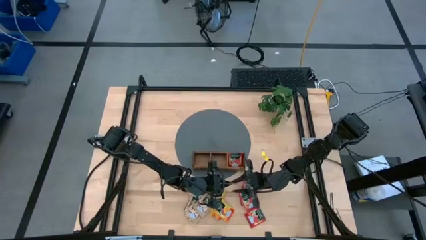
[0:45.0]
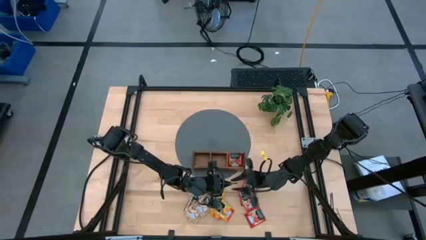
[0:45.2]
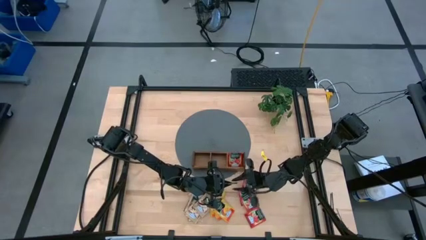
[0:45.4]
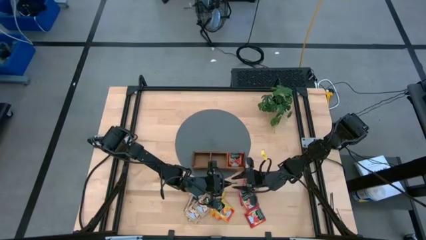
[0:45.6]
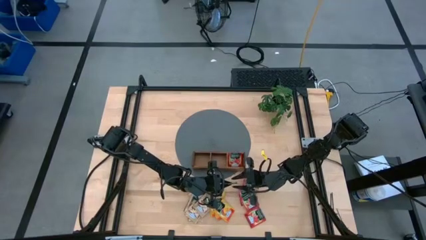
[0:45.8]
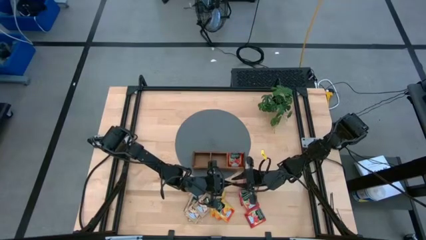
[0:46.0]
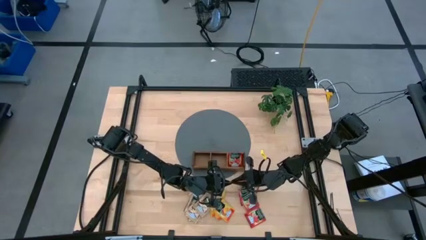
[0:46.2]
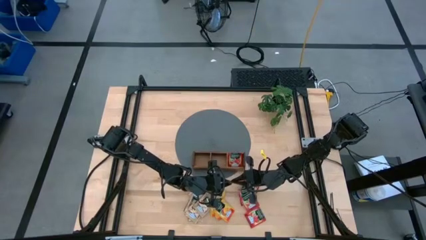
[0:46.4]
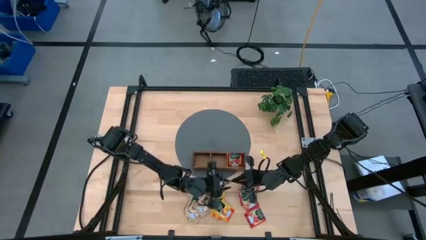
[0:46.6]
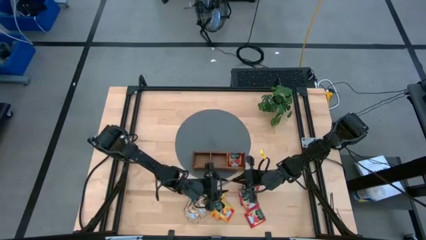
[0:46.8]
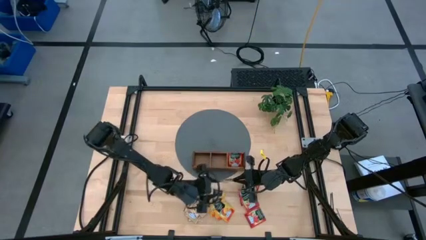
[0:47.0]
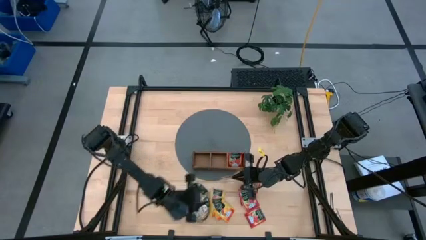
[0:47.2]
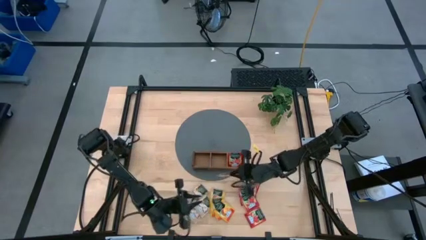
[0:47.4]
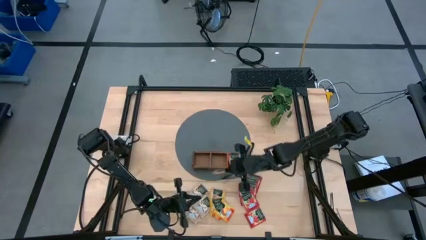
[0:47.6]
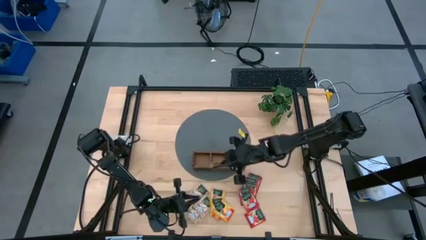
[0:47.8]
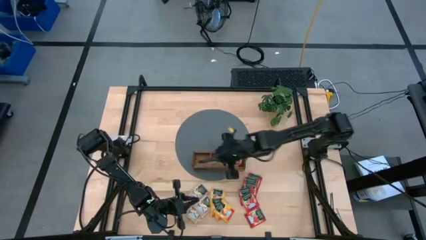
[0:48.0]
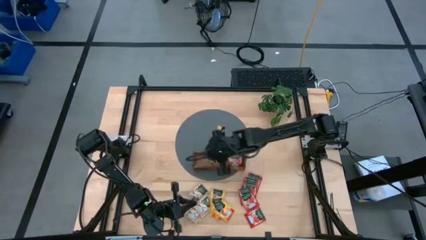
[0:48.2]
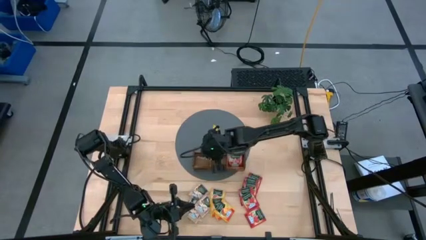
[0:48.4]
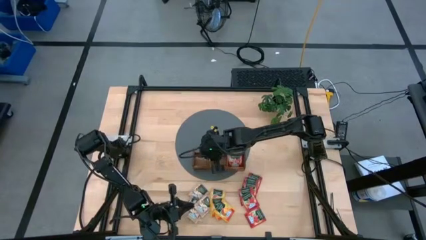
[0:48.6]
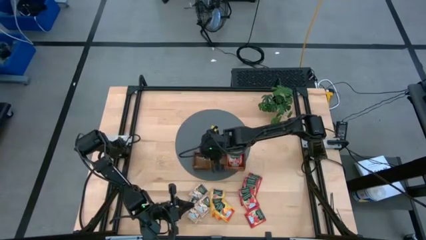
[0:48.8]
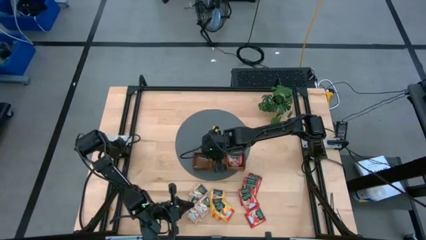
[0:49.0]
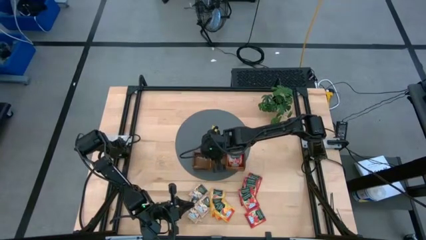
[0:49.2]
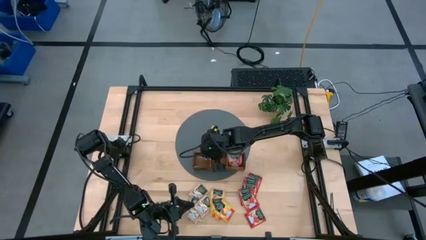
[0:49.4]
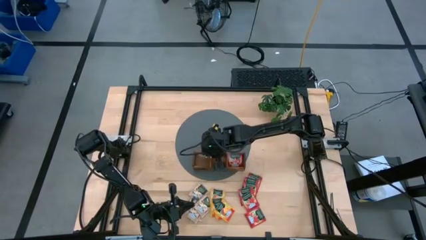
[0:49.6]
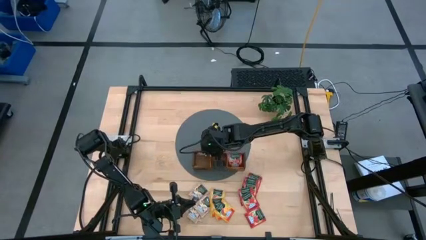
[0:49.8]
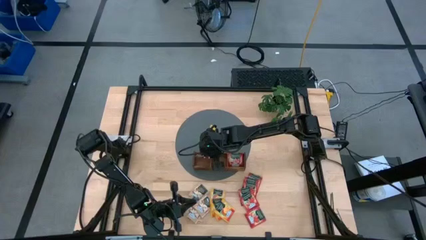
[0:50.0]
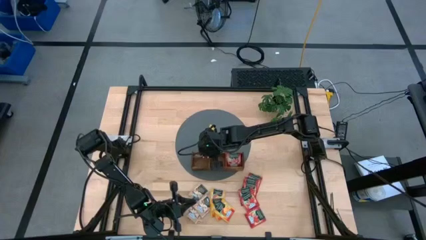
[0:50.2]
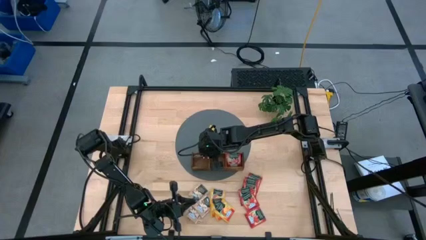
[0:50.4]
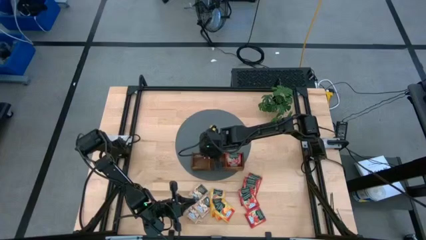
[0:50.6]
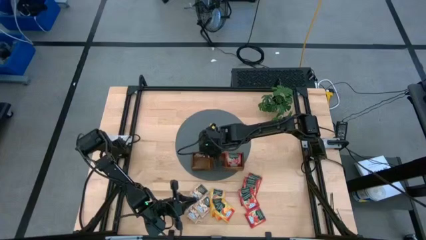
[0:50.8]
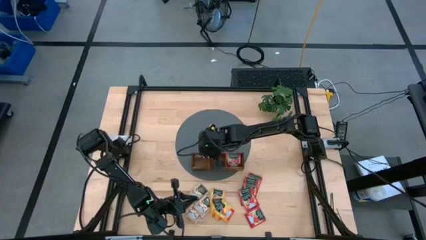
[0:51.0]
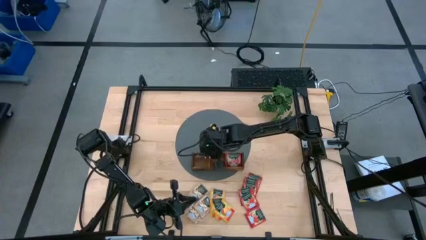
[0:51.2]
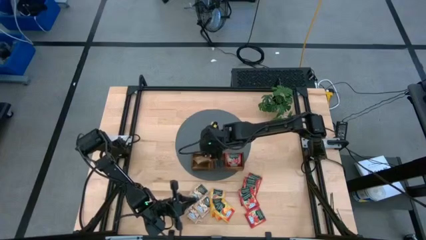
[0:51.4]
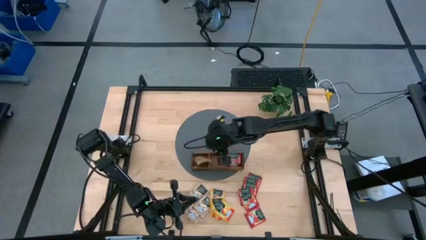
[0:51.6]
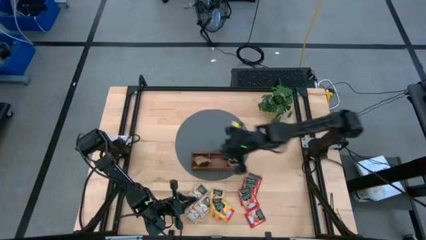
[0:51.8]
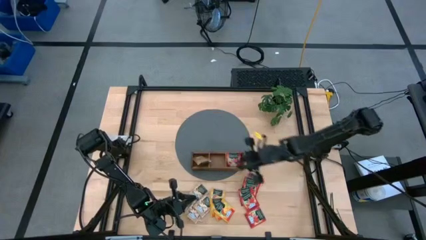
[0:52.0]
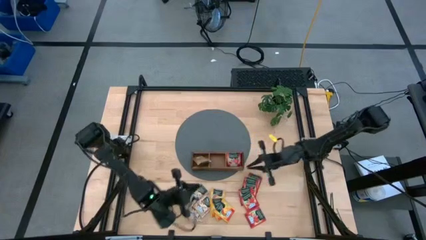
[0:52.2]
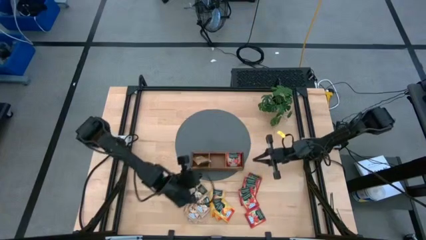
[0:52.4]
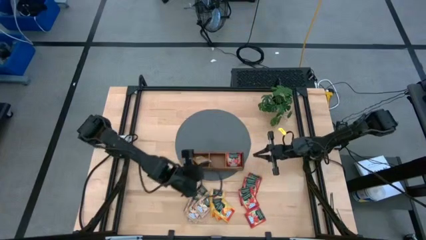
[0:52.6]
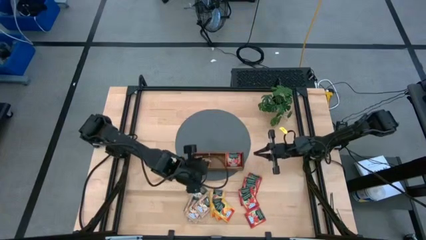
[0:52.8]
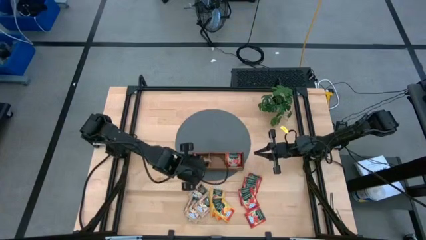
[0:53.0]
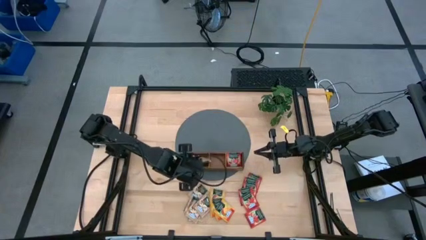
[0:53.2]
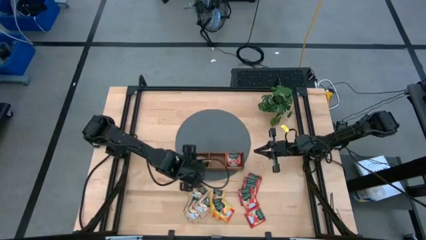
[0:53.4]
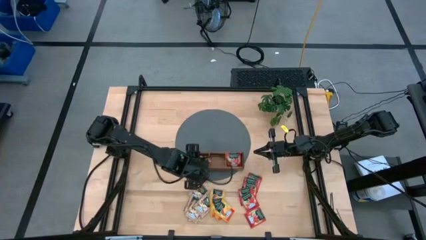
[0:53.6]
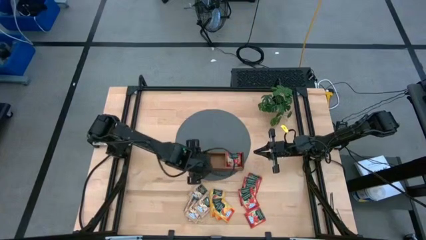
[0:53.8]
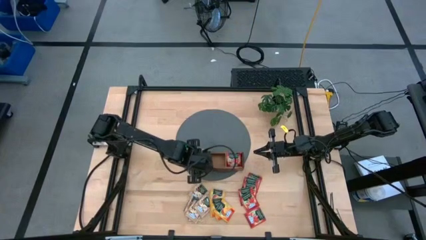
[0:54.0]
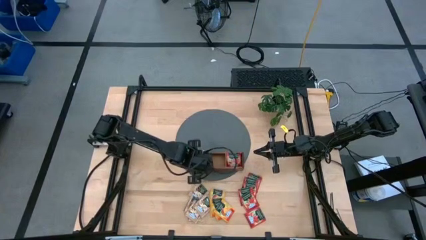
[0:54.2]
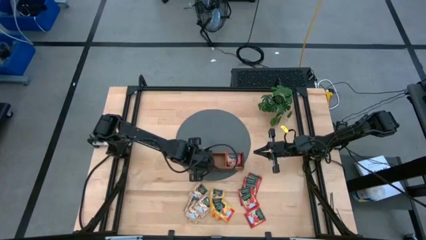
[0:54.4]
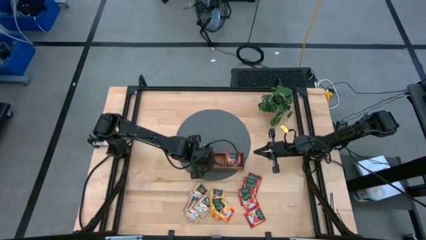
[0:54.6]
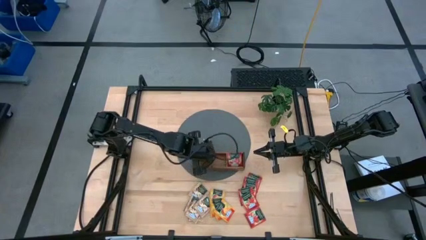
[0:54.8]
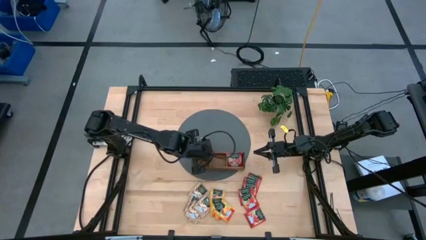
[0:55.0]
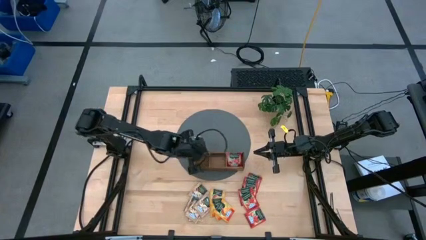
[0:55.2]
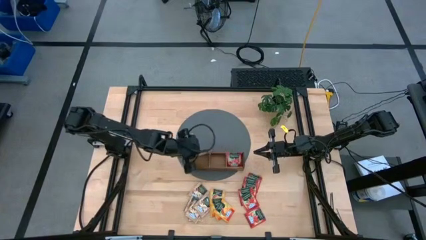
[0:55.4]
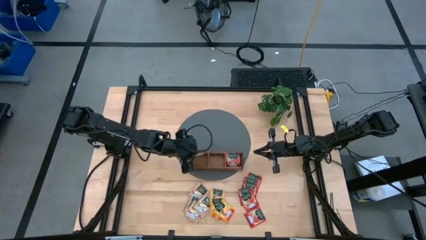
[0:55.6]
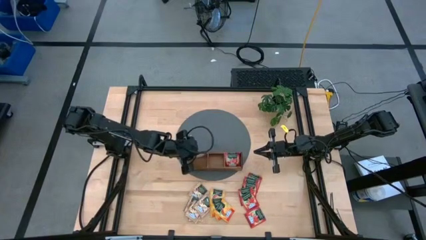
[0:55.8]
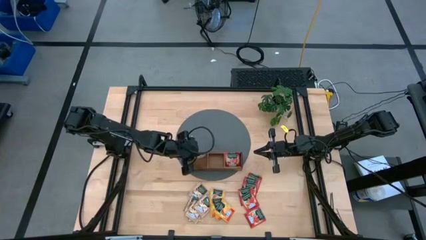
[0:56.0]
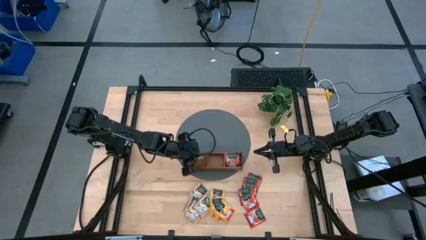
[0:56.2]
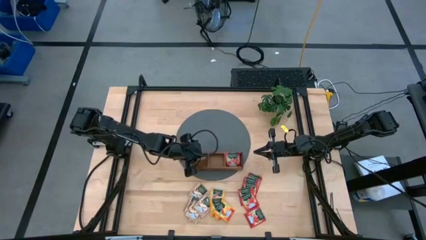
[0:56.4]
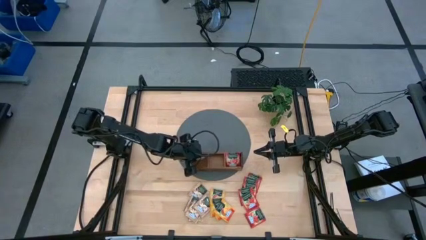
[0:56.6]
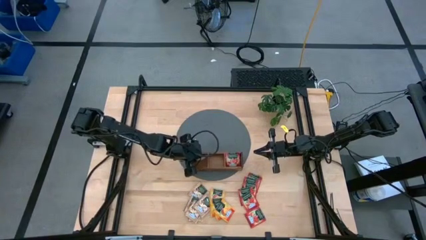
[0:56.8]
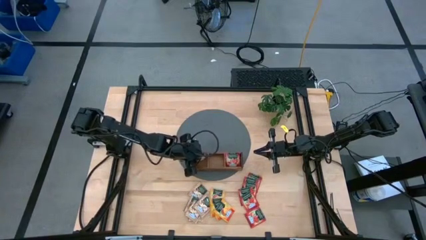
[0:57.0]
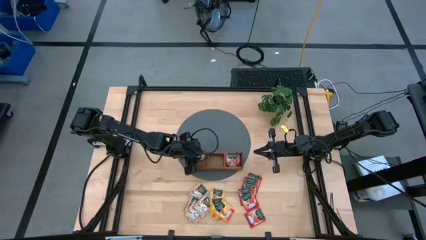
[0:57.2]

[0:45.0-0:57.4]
Task: Pick & Place Tea
Put the brown tea bag into the left section of the wooden organizer

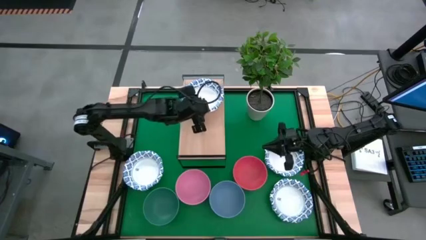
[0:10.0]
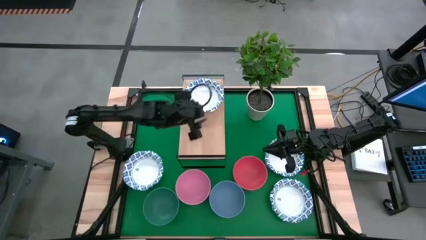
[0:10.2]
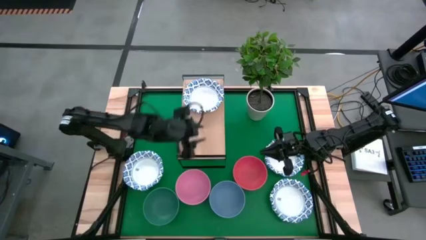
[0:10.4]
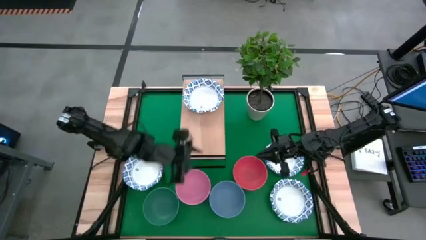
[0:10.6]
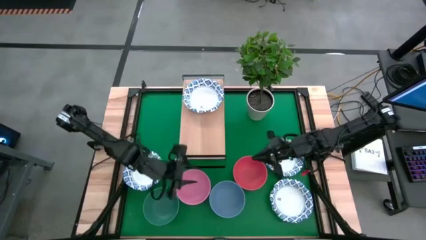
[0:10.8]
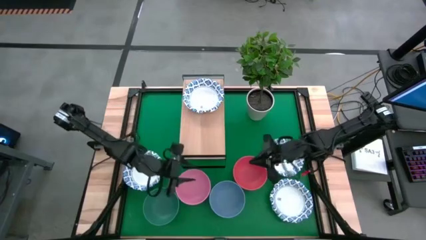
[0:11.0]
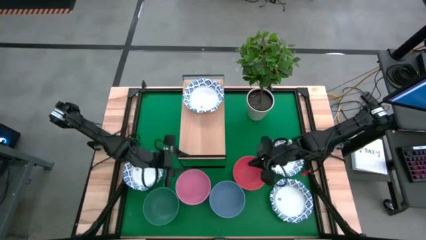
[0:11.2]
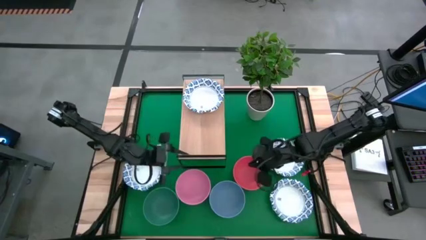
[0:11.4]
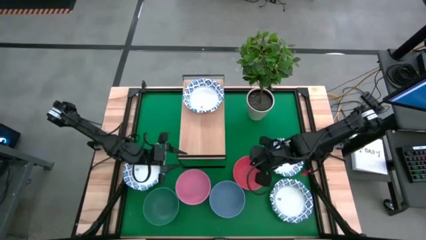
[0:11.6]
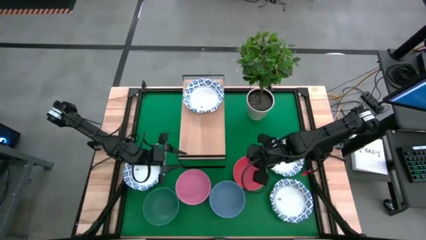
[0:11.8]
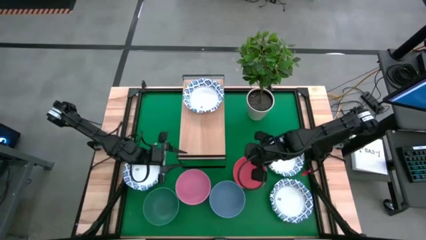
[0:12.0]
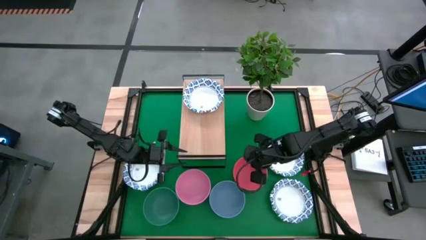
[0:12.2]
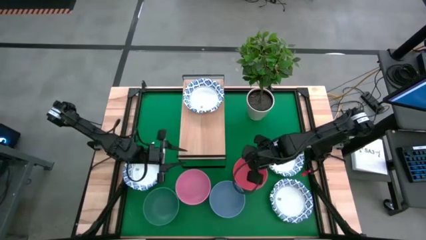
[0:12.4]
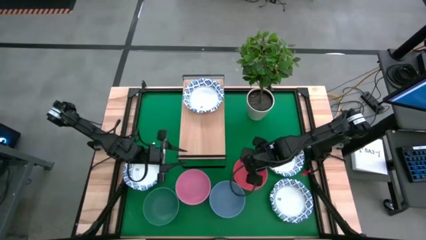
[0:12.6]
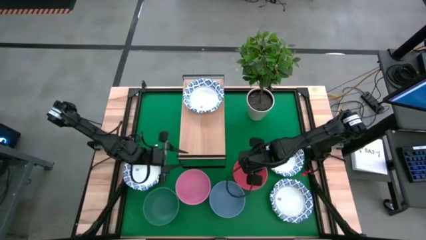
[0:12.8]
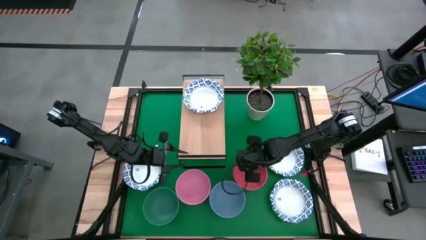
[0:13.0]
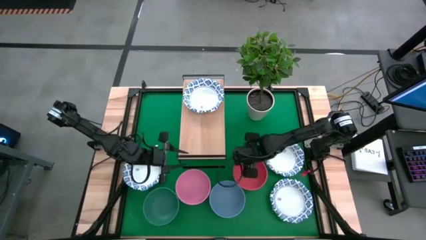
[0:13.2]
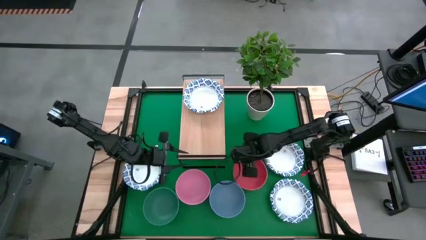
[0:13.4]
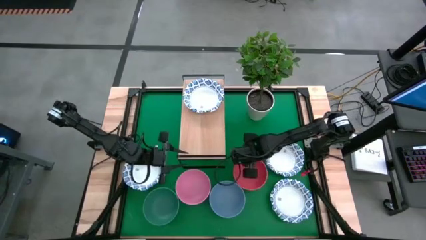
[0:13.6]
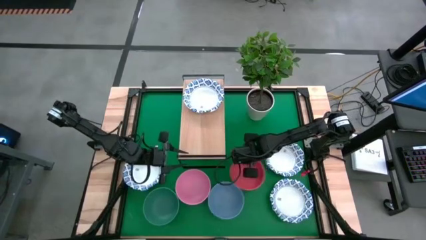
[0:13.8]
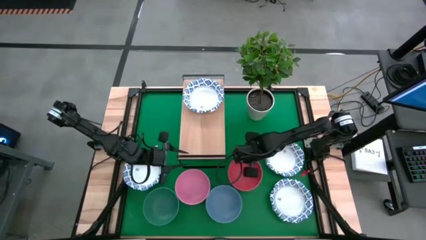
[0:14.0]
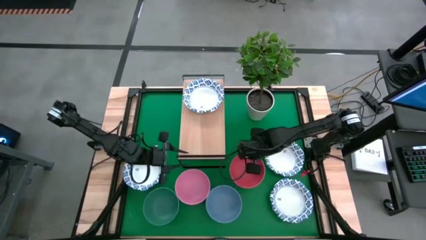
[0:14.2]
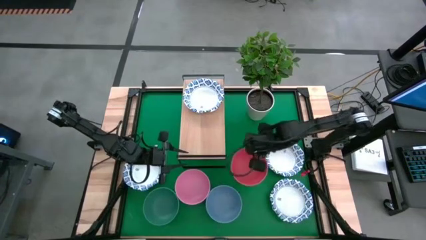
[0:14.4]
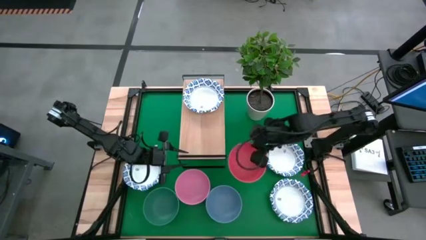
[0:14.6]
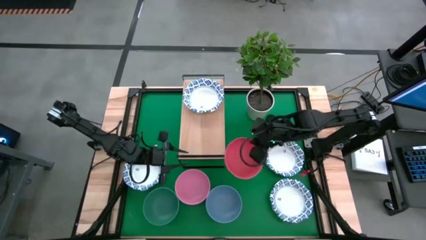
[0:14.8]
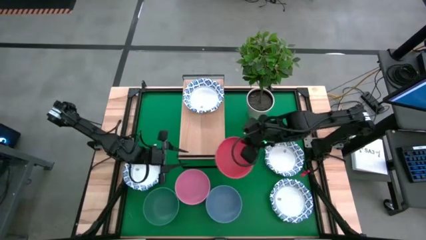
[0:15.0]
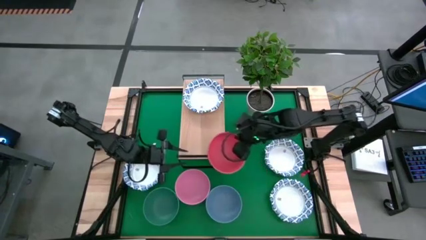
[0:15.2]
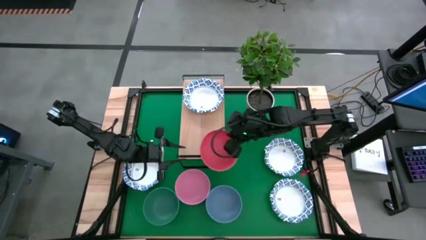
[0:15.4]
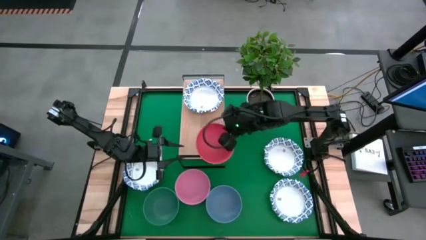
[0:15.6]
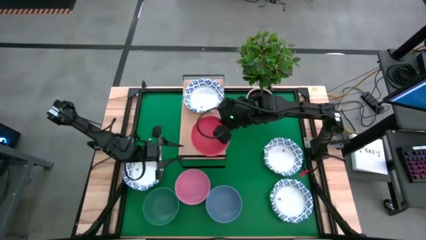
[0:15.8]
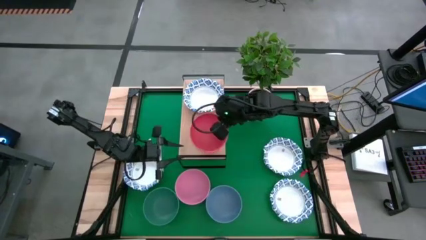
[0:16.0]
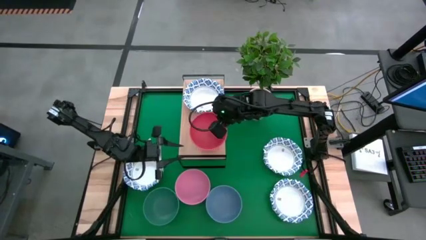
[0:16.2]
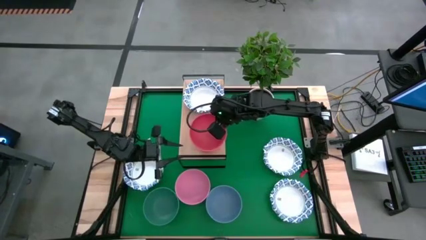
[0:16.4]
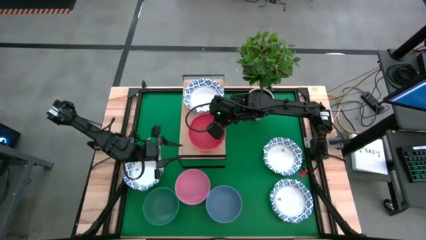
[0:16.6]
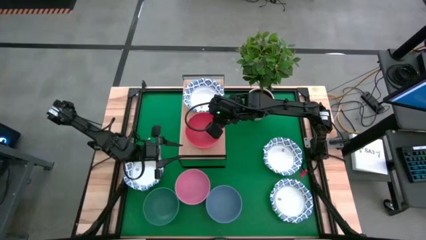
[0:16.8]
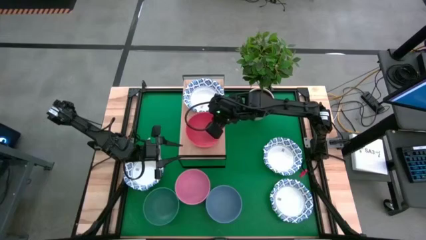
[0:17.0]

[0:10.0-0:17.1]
Task: Place and stack bowls onto a shelf
Put the orange bowl on the shelf
